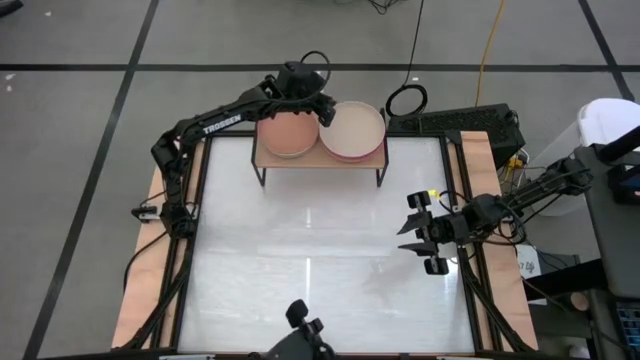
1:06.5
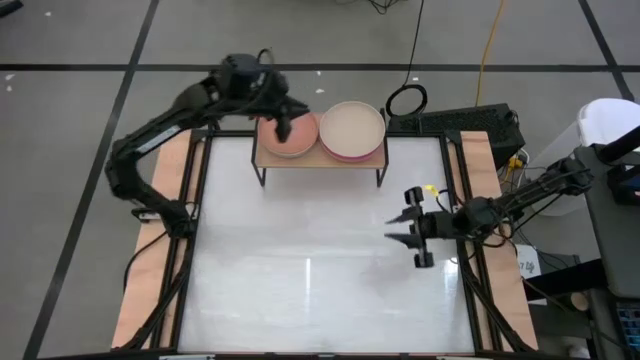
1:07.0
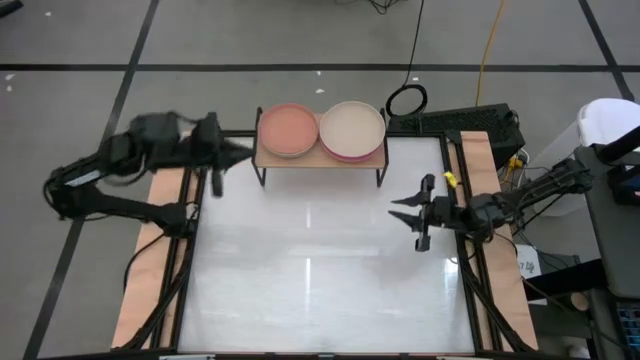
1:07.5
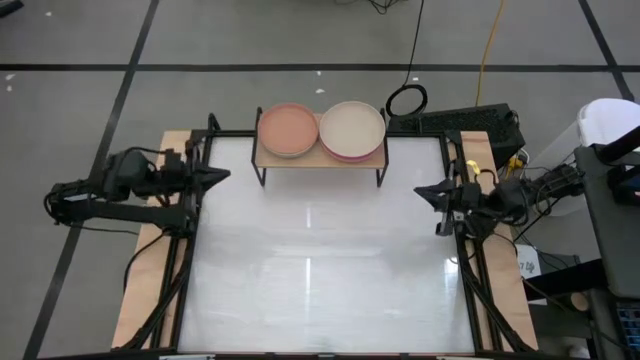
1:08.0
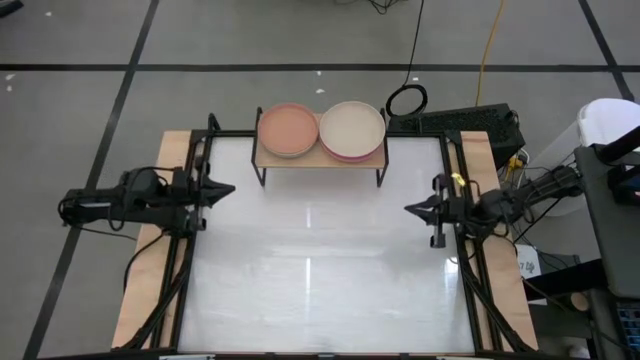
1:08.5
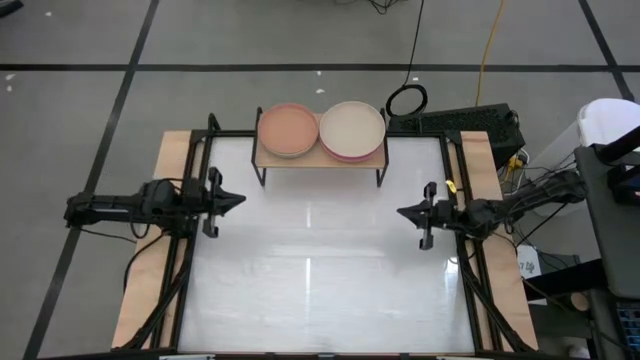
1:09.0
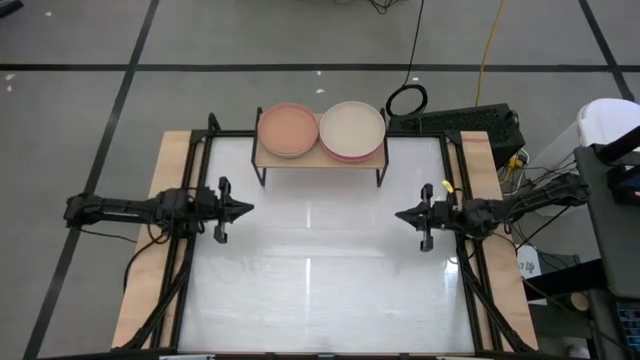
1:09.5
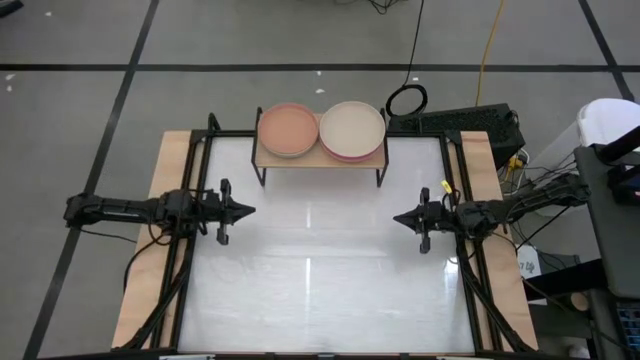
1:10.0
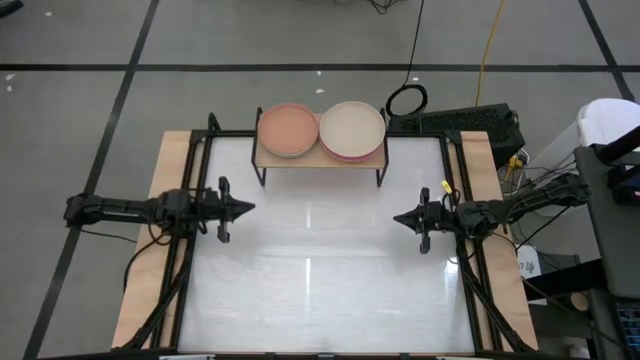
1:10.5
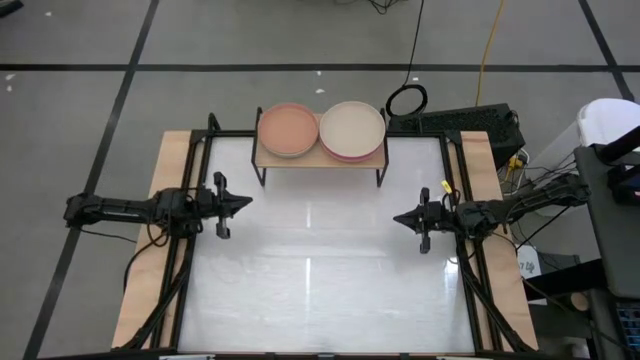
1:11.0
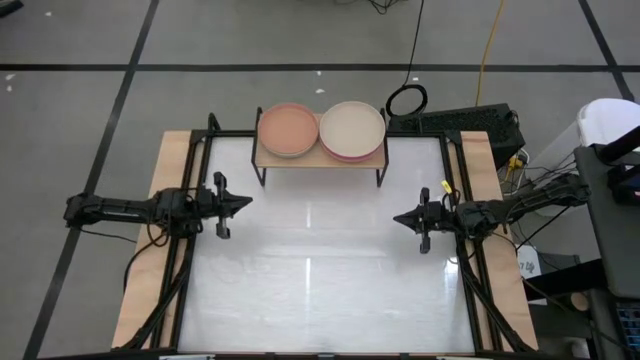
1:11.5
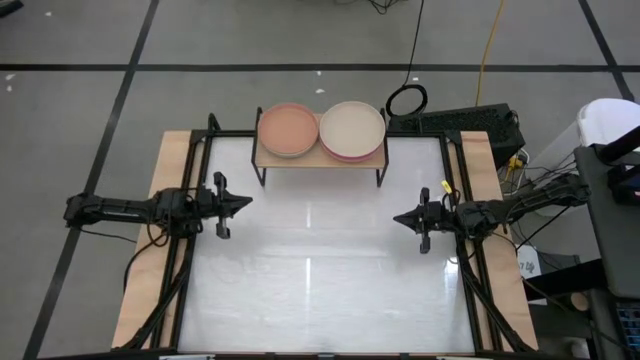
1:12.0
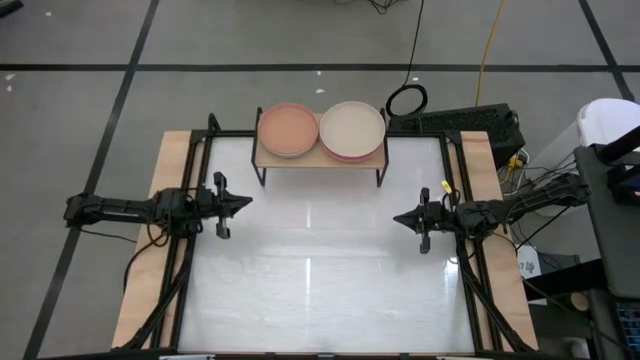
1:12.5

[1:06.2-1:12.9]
Task: Place and stack plates onto a shelf
Return to Home Position

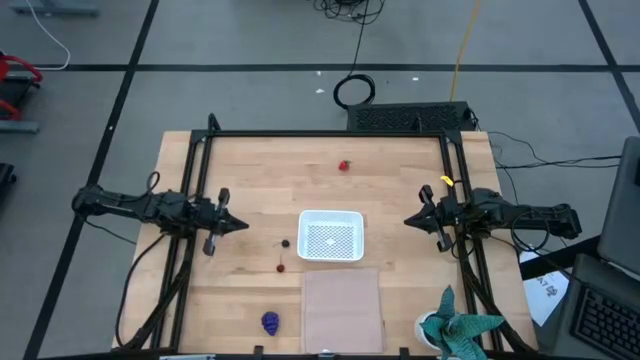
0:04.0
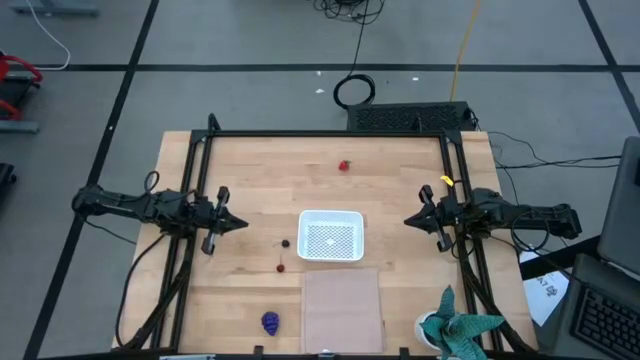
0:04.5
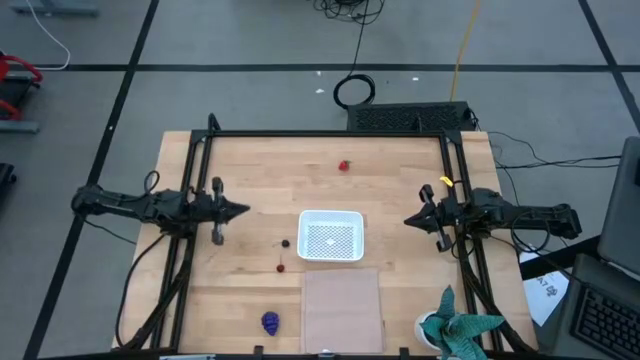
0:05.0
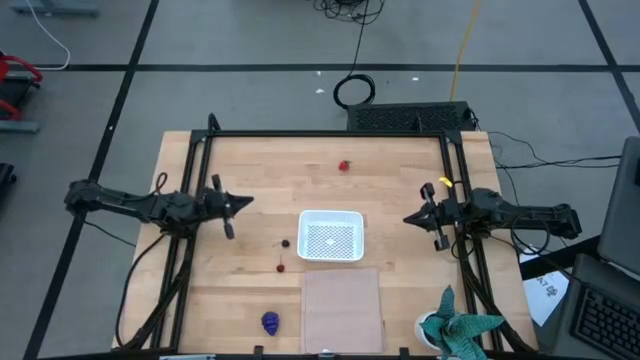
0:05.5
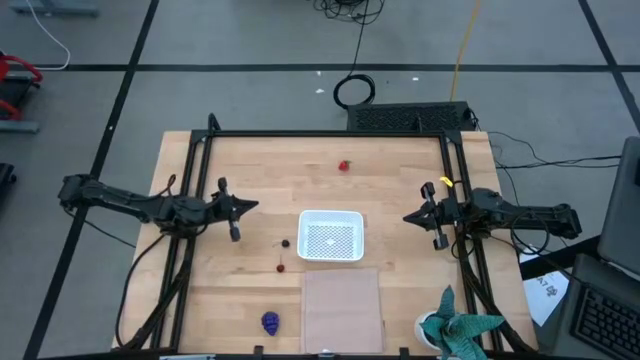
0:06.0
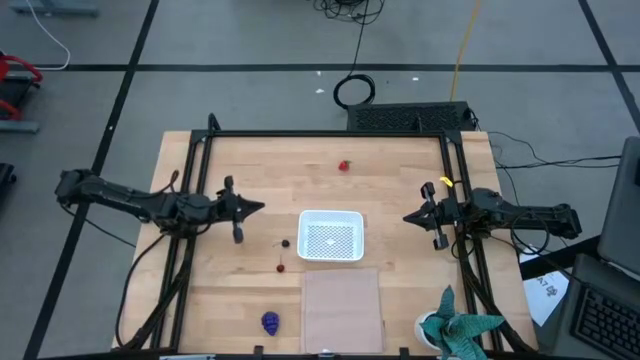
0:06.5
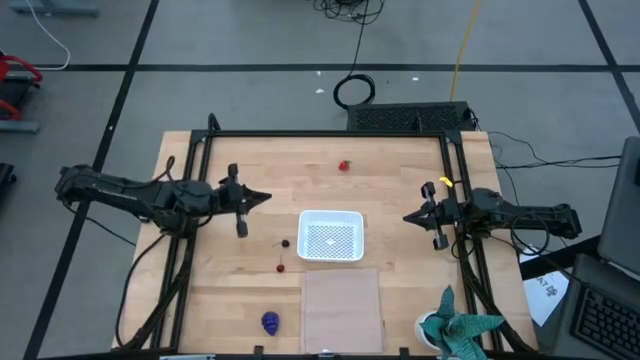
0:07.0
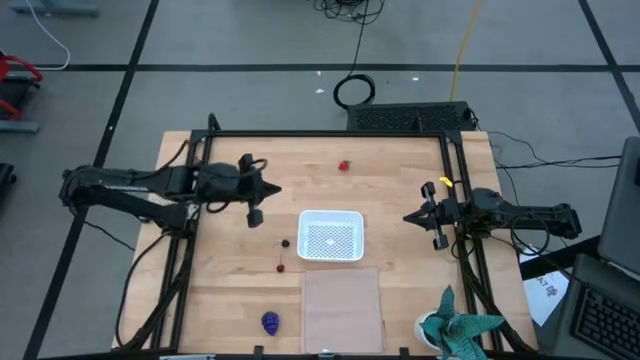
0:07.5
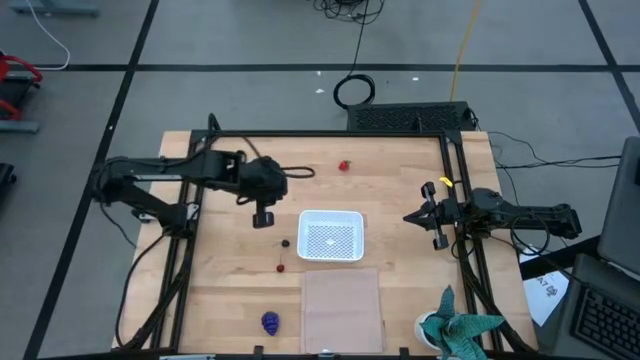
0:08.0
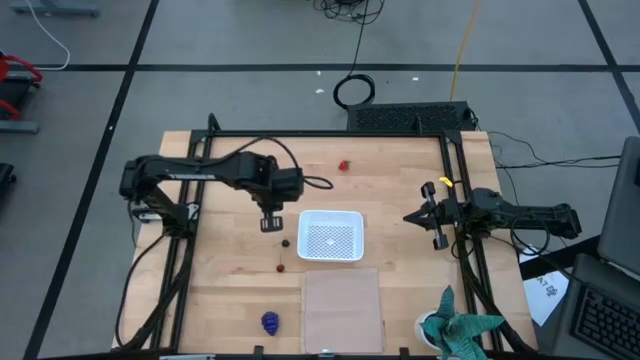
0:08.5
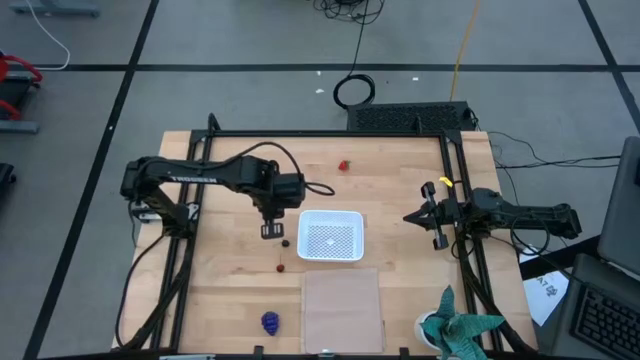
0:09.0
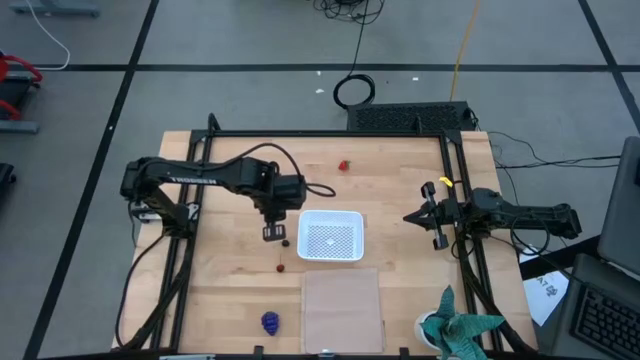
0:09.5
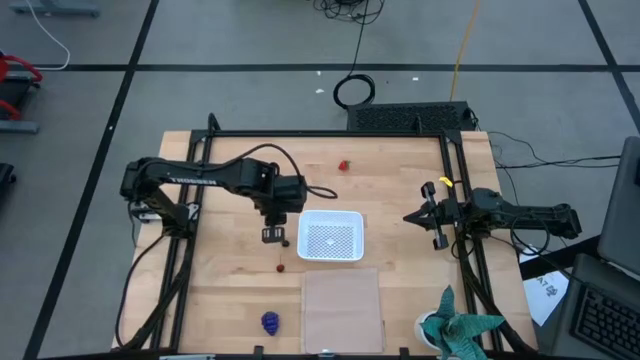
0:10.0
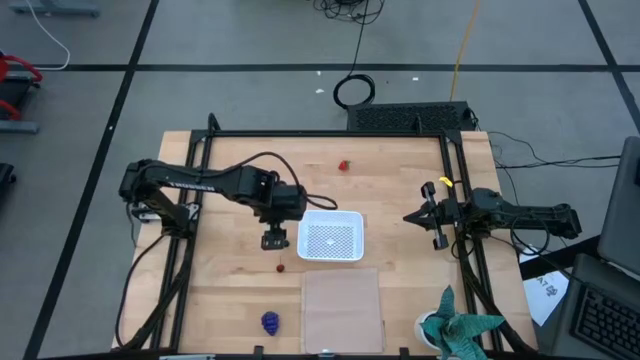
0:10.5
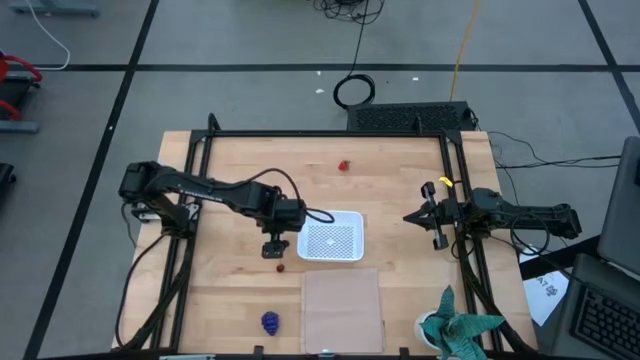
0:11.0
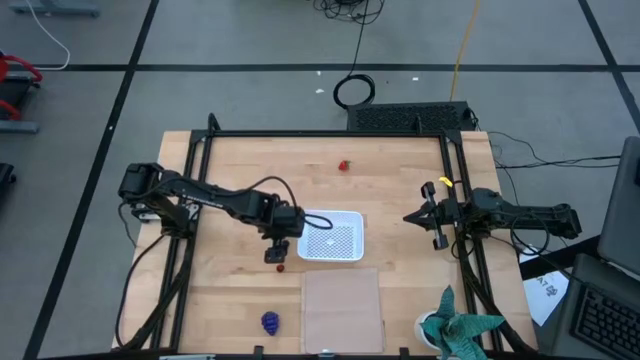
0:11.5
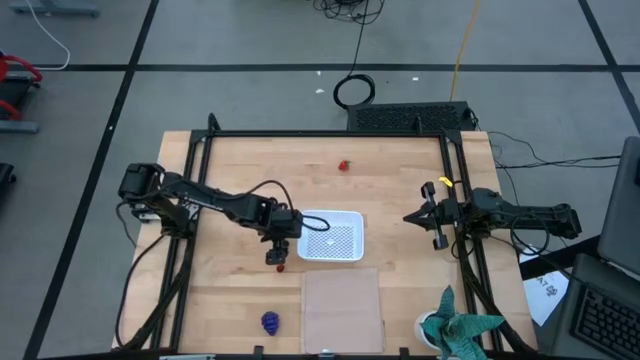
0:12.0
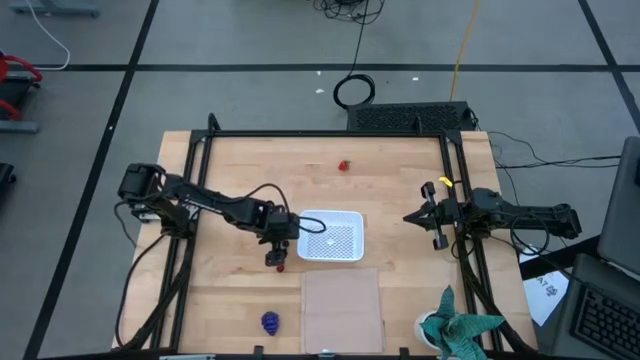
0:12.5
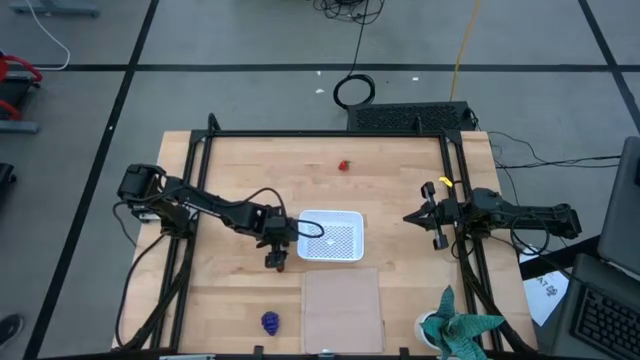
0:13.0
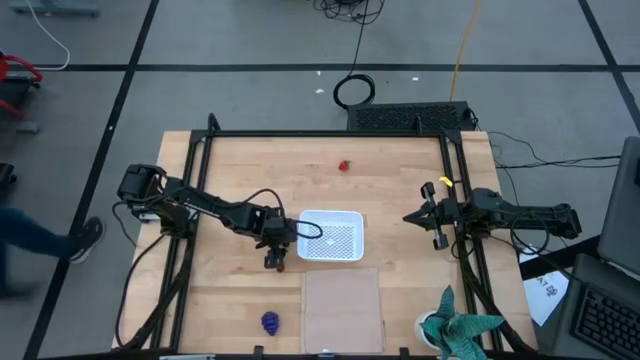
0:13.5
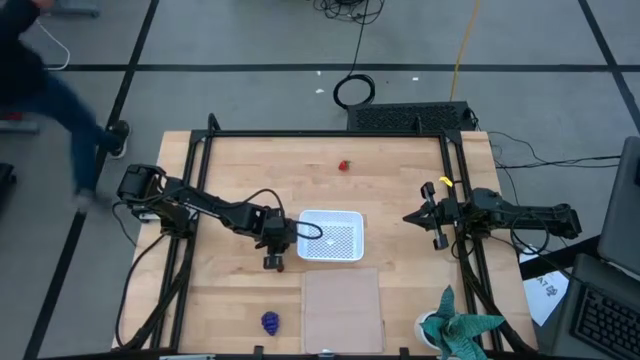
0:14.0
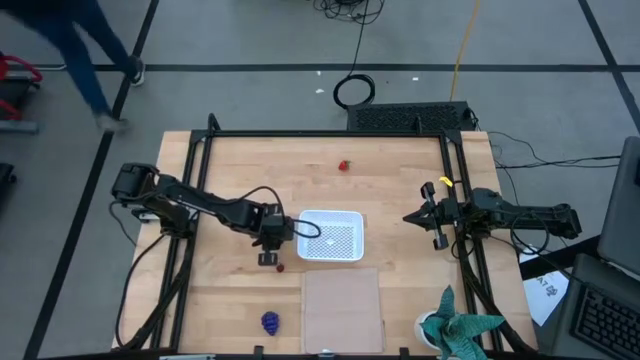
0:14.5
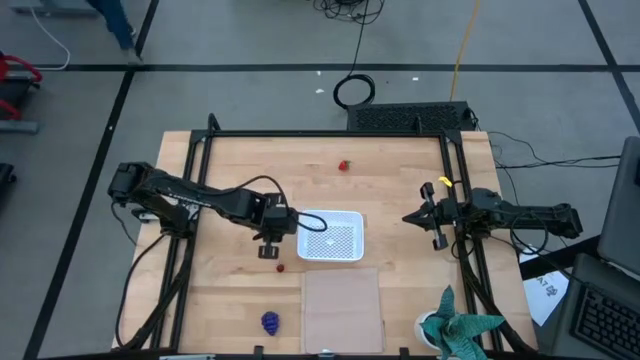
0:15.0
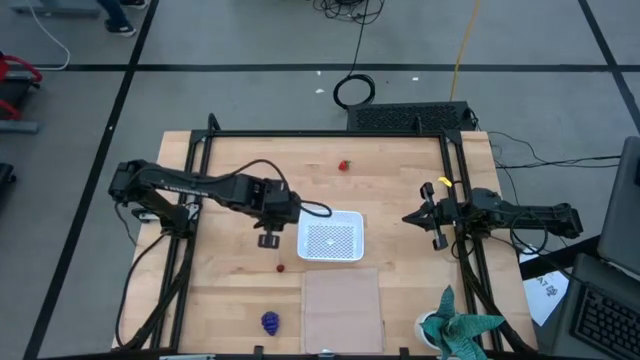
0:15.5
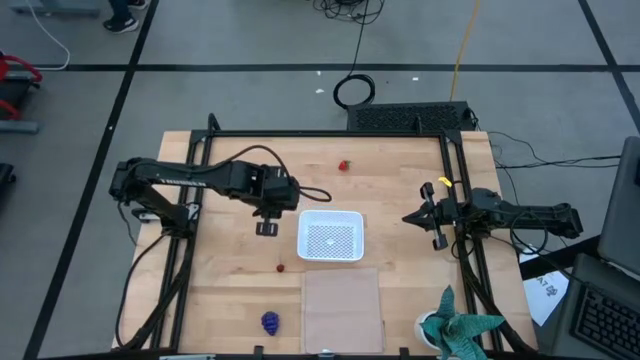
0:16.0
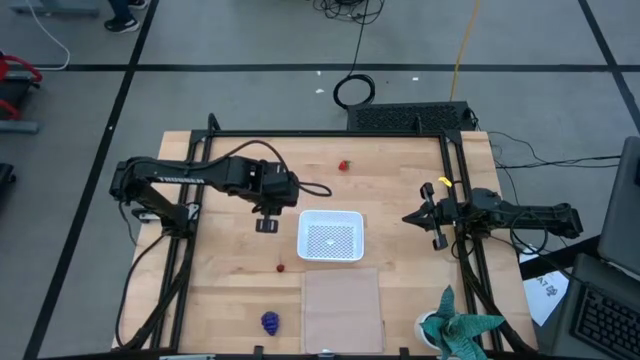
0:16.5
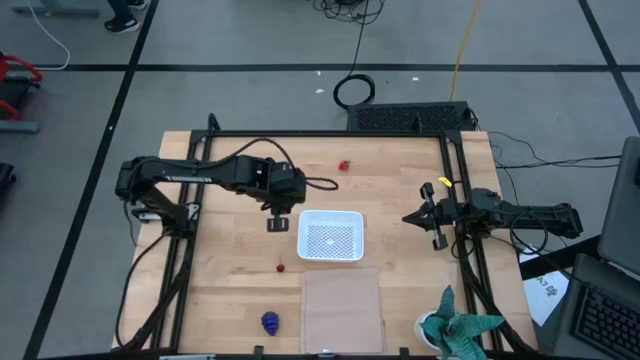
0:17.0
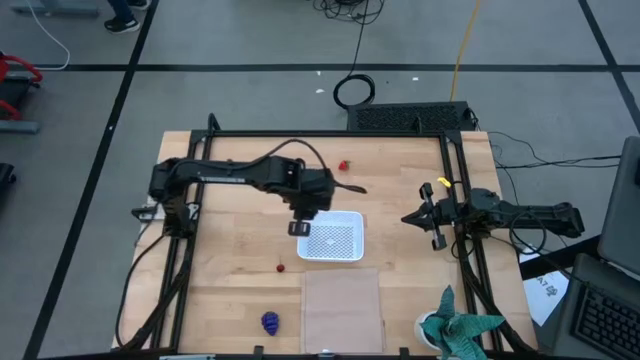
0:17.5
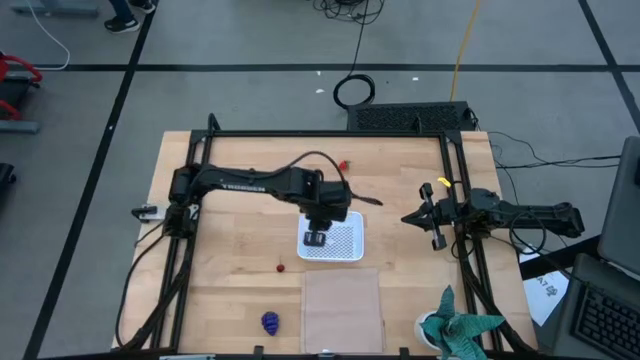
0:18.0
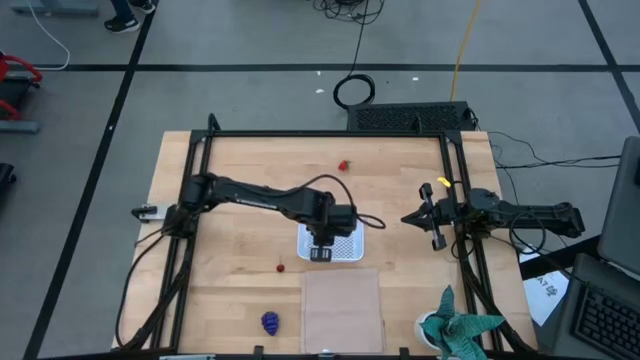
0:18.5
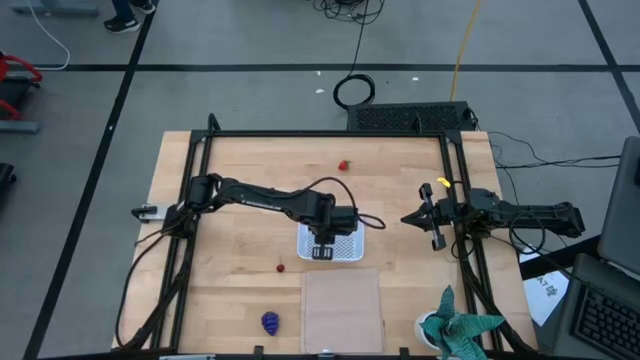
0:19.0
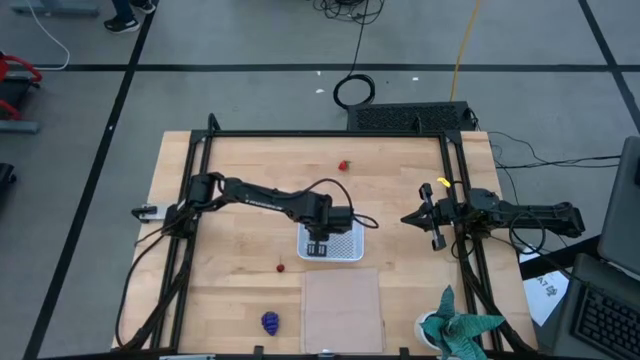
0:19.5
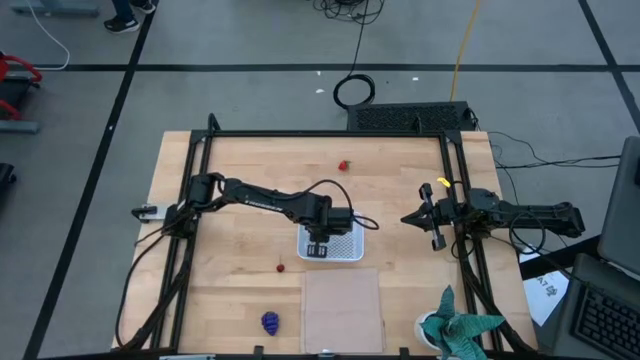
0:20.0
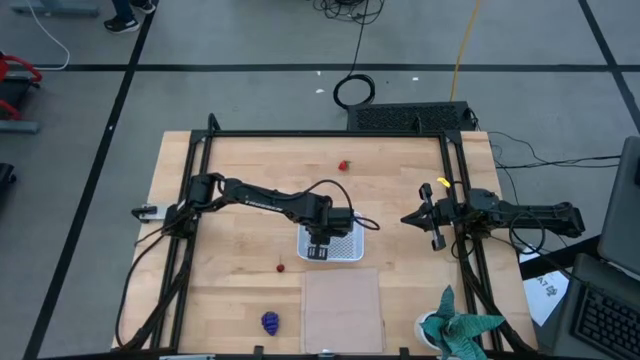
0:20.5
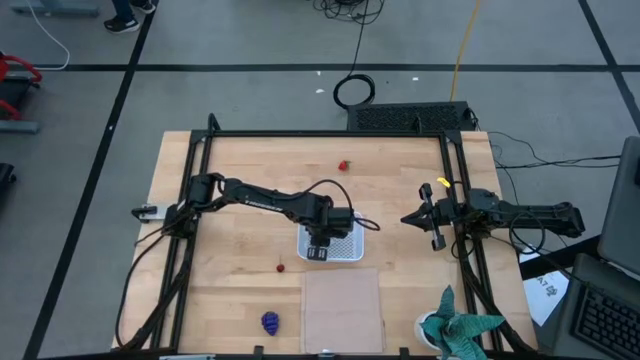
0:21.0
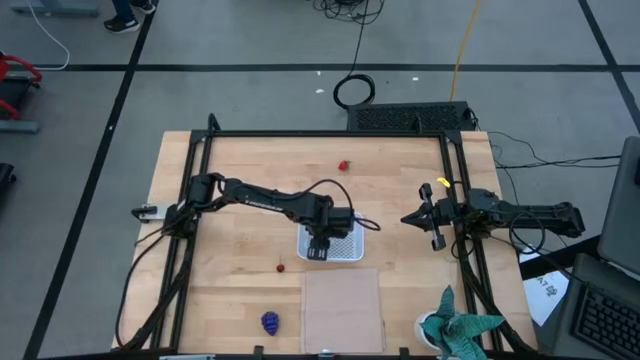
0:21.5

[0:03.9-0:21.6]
Task: Pick and placing Produce into tupperware
Put the black cherry into the white bin
